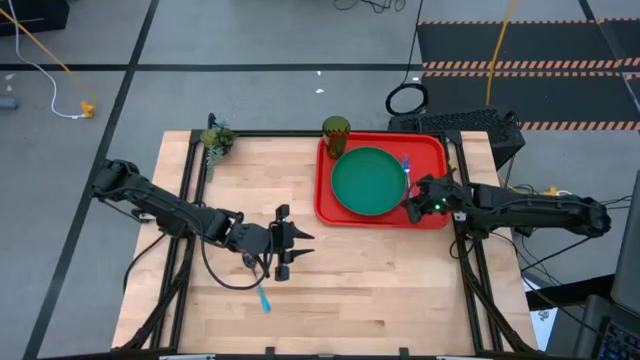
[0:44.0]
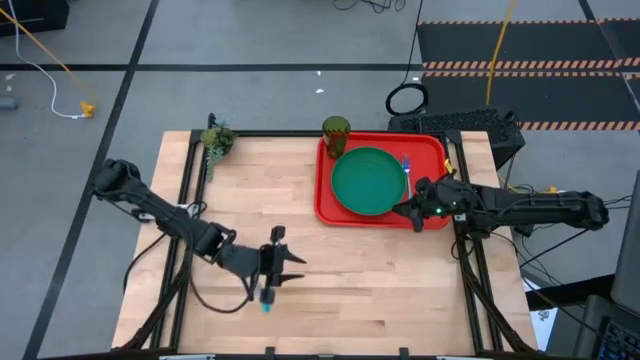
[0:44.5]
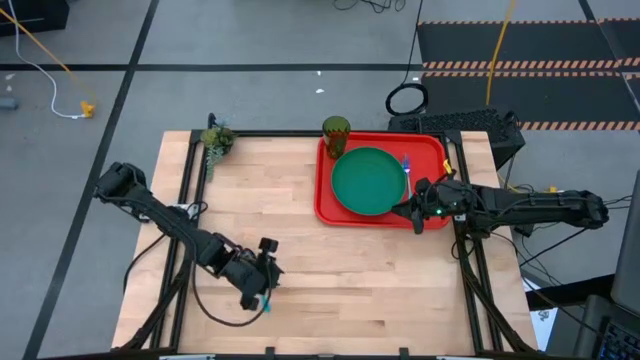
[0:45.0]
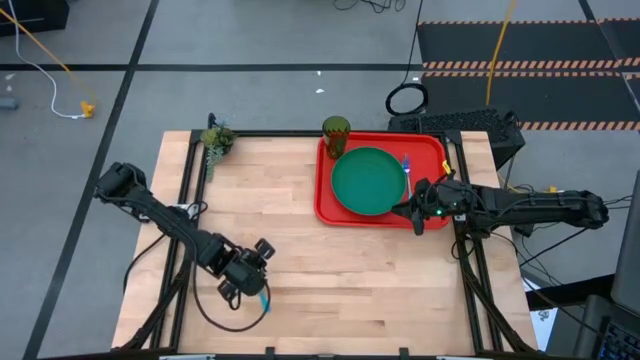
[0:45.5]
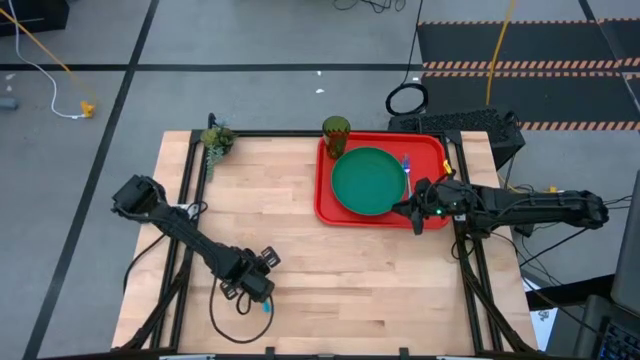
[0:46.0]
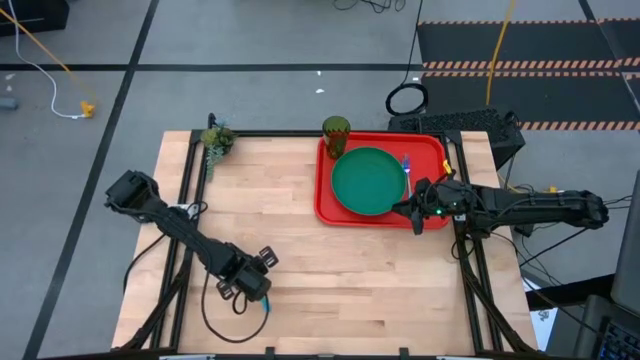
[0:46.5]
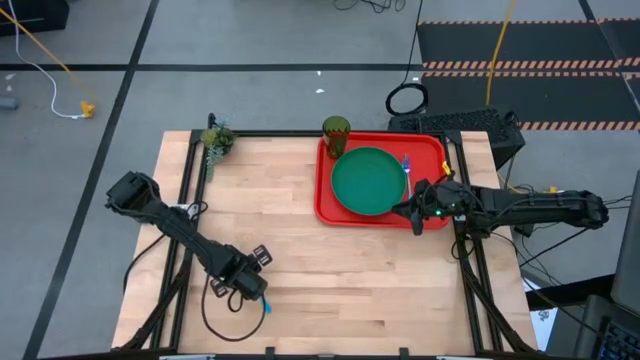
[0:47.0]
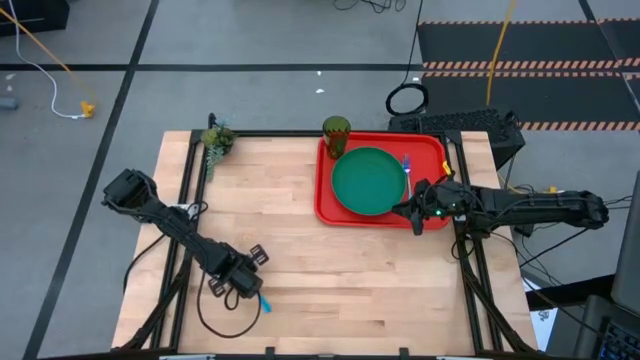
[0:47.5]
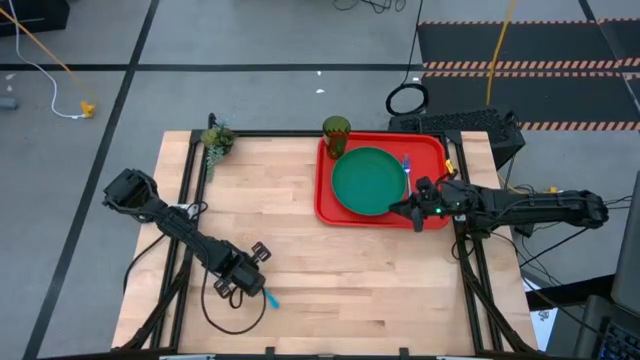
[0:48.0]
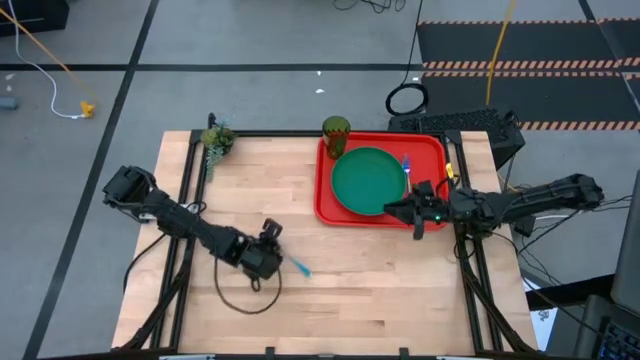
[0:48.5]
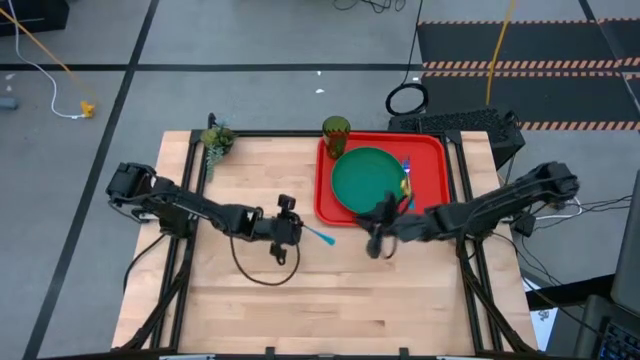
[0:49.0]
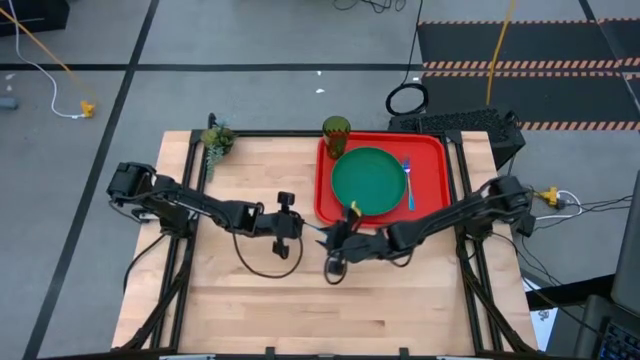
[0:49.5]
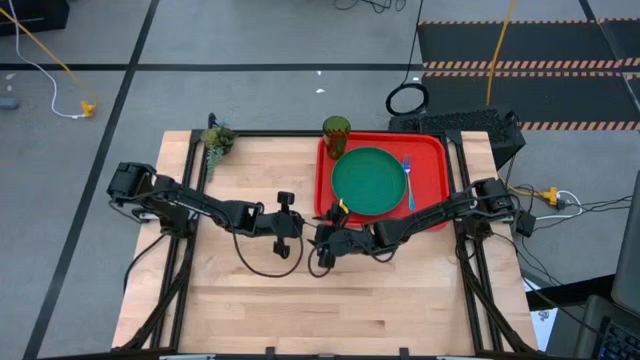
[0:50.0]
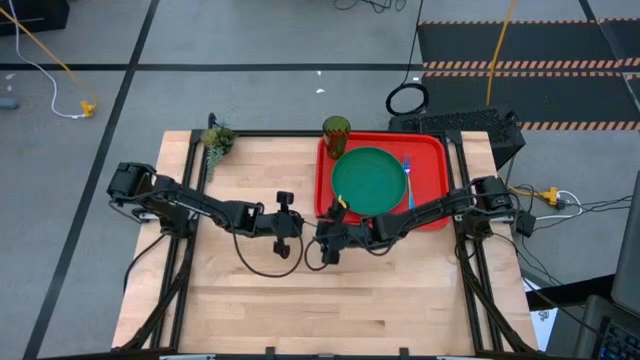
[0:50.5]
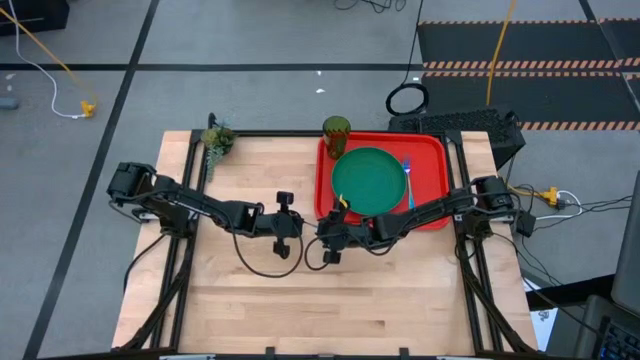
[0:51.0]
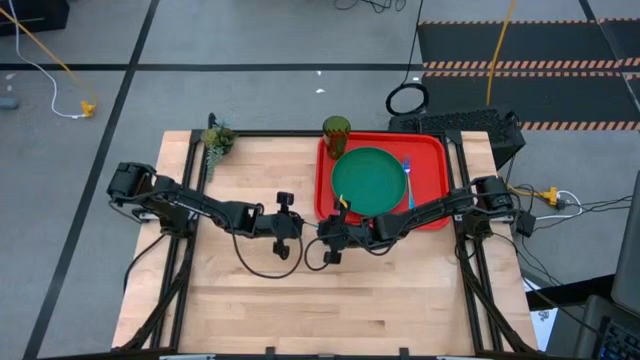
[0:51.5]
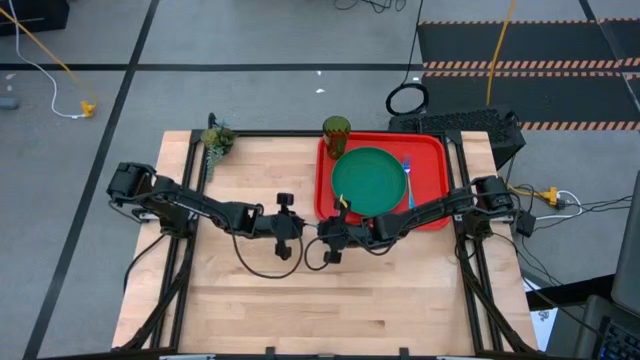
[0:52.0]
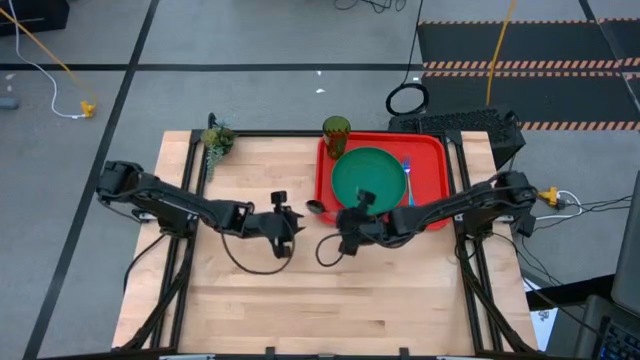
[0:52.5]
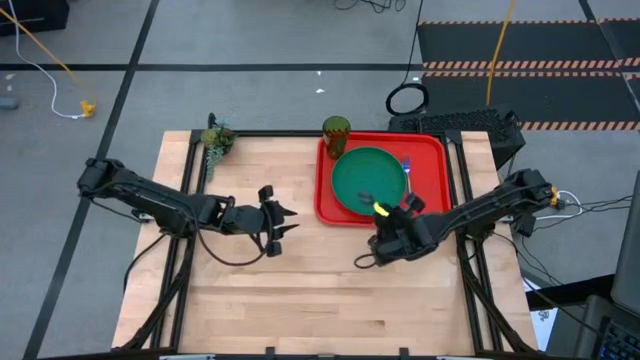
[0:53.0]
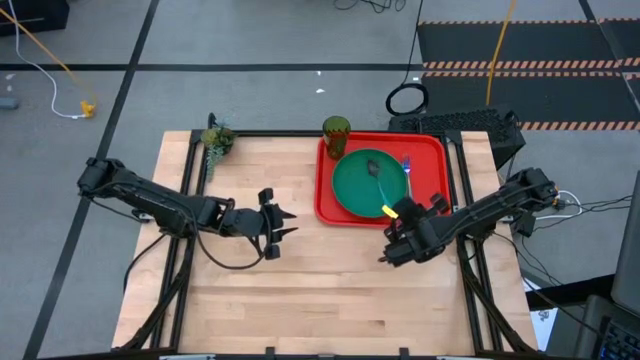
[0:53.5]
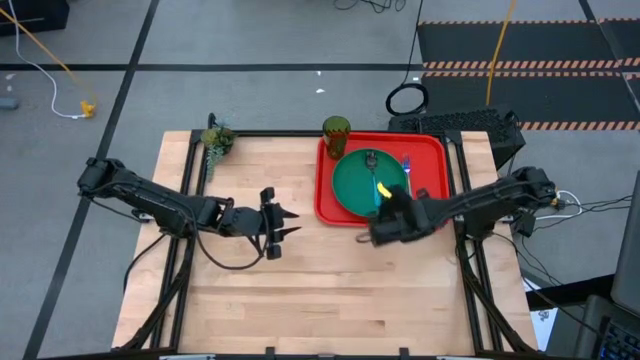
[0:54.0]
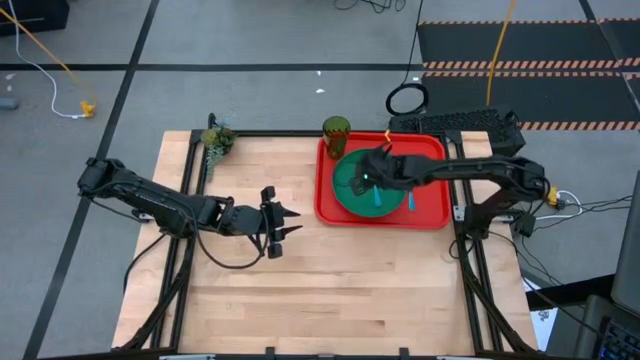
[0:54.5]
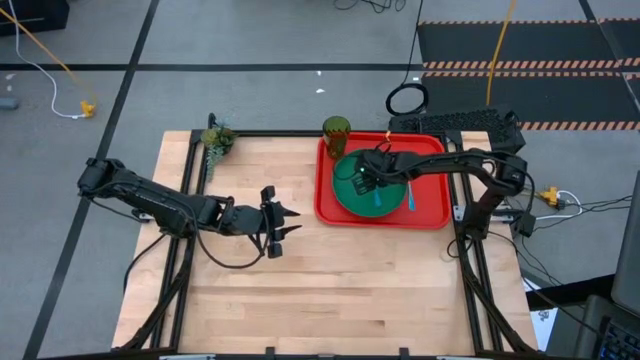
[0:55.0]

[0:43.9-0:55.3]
Task: Pick and place plate/cup/fork/spoon on tray
Put the blue spoon beside the fork on the red tray

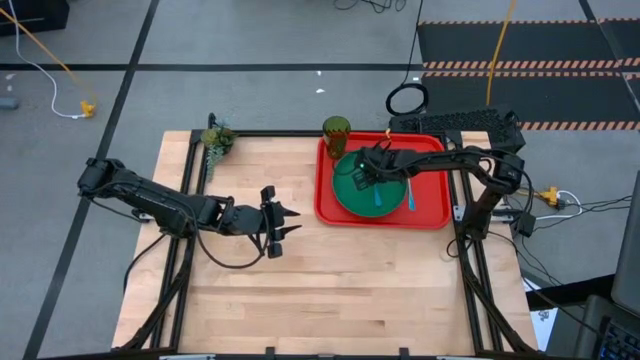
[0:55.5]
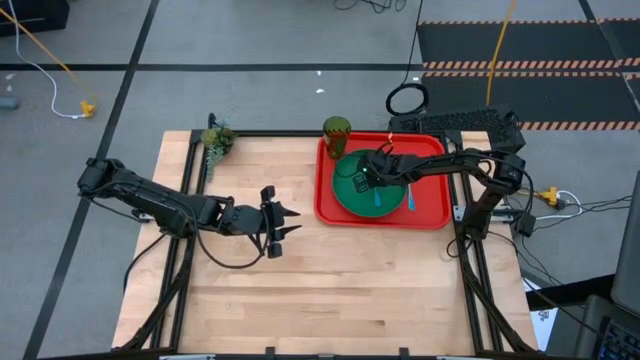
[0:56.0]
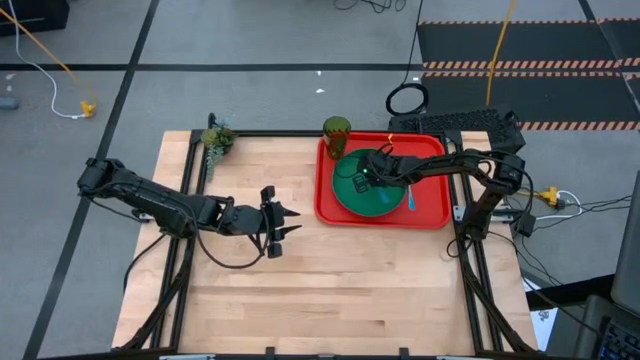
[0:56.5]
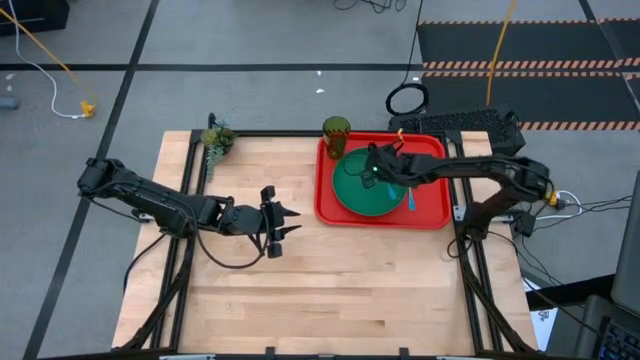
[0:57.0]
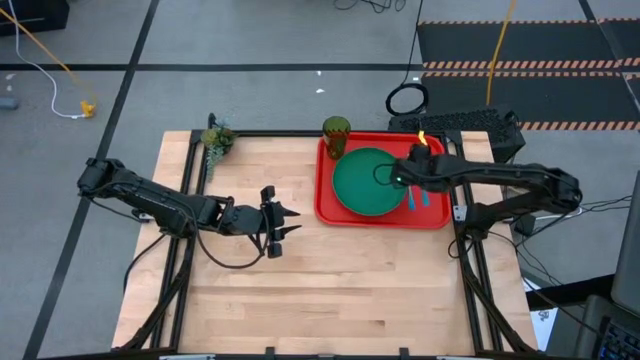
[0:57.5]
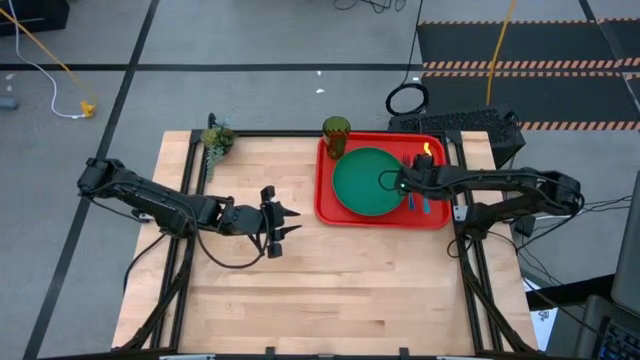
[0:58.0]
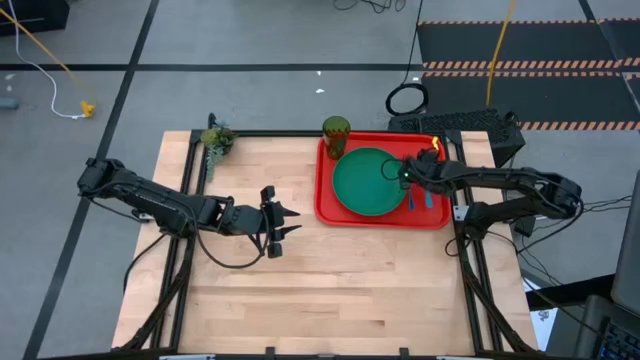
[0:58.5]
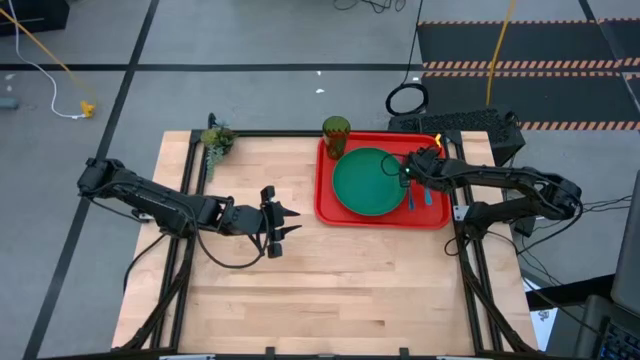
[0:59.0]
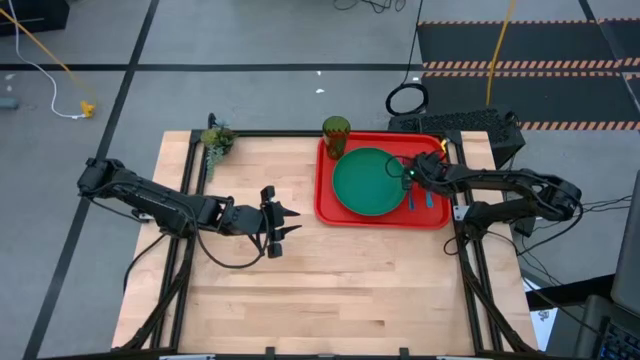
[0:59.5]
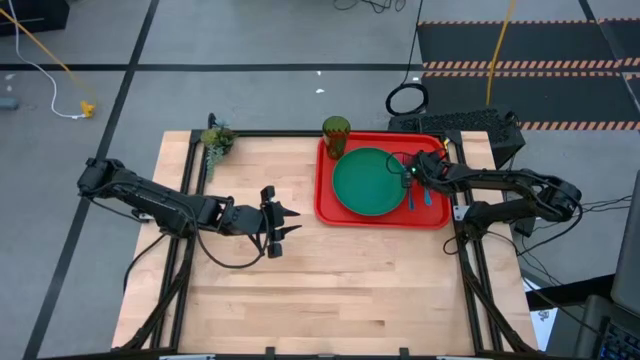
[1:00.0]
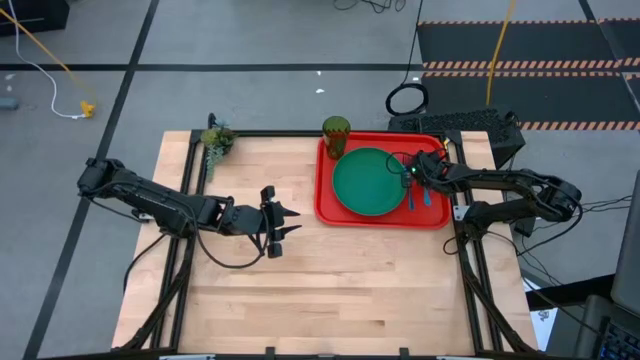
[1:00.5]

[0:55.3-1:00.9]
Put the blue spoon on the red table tray

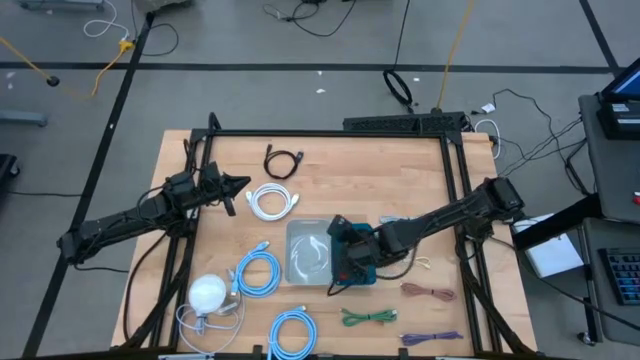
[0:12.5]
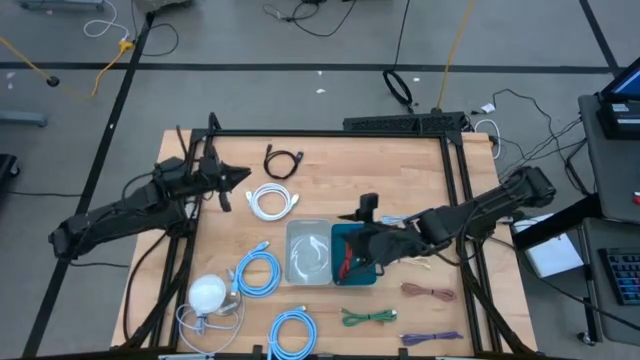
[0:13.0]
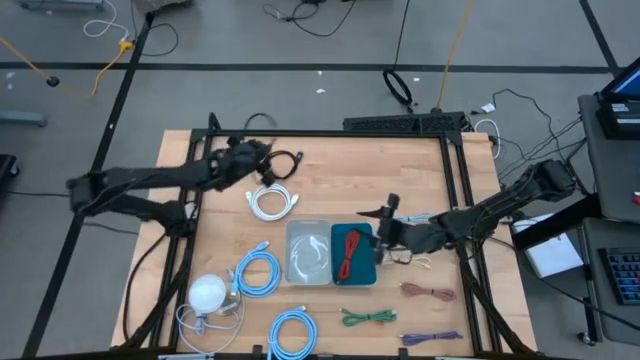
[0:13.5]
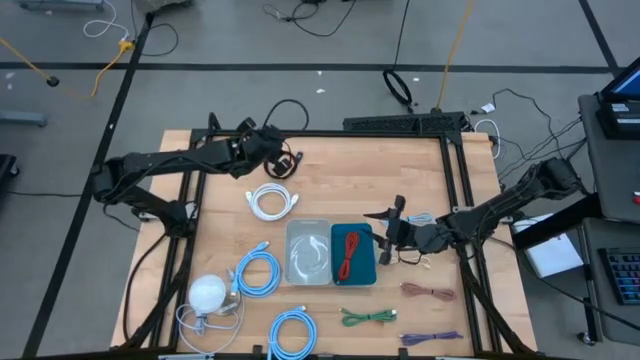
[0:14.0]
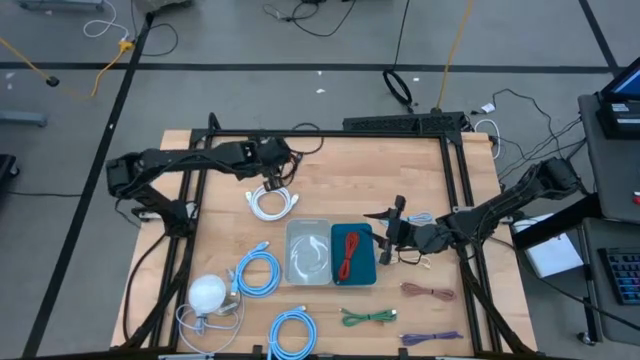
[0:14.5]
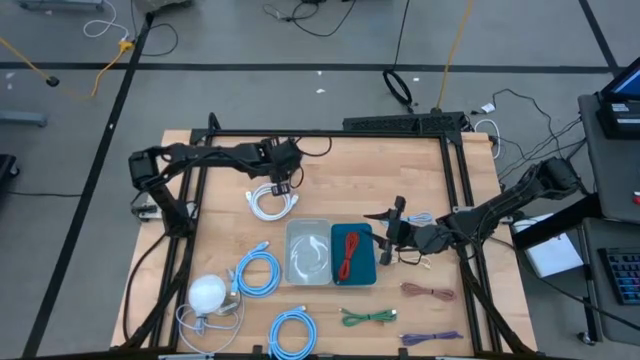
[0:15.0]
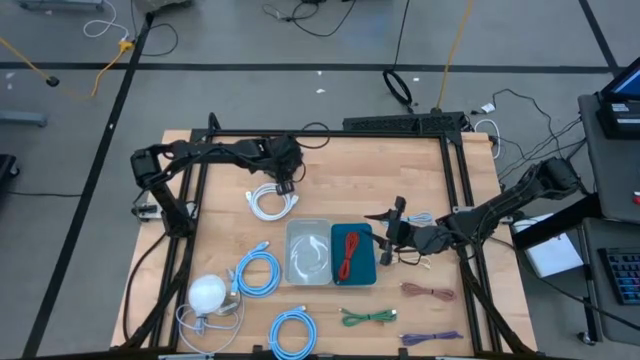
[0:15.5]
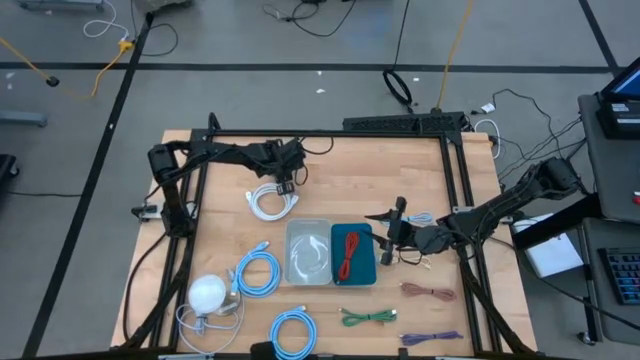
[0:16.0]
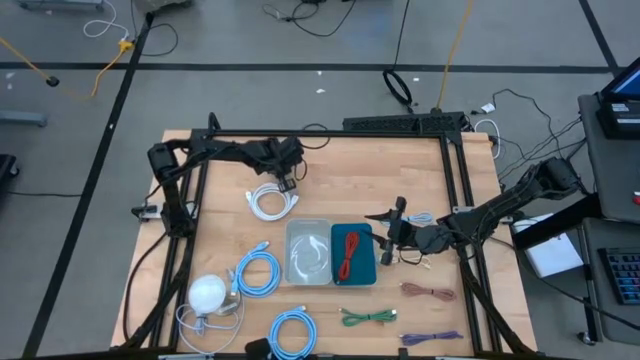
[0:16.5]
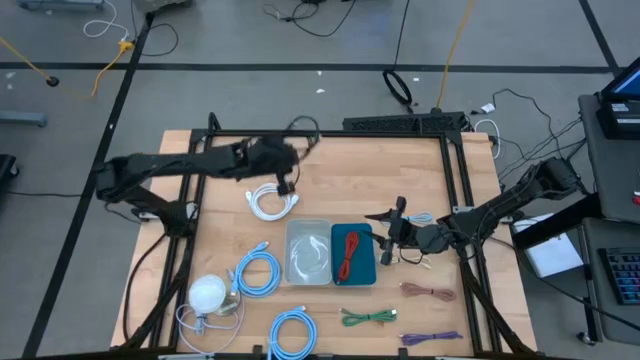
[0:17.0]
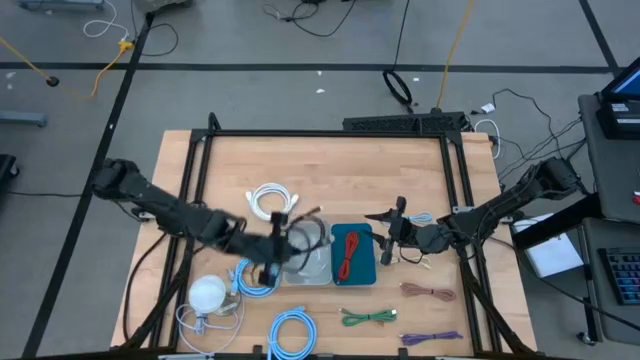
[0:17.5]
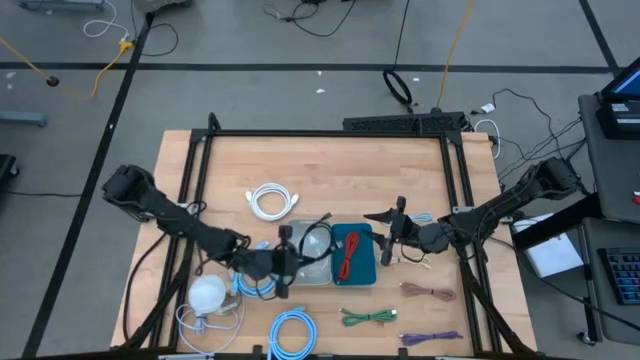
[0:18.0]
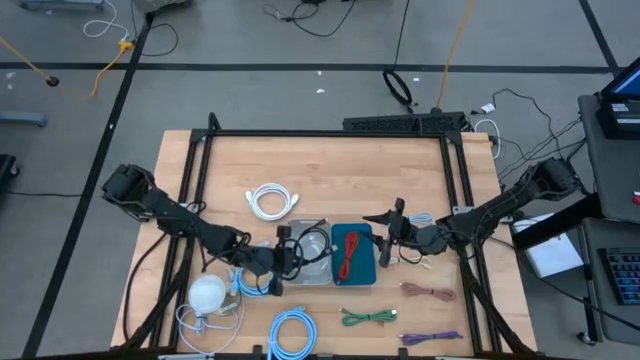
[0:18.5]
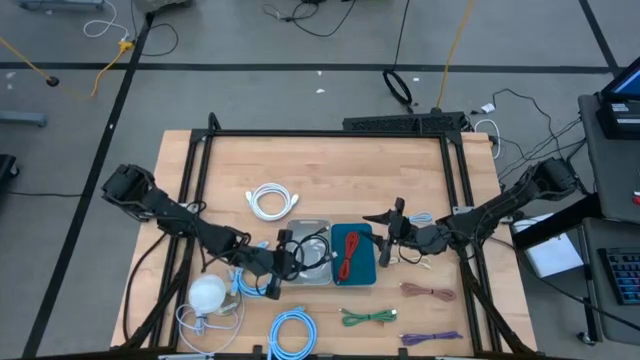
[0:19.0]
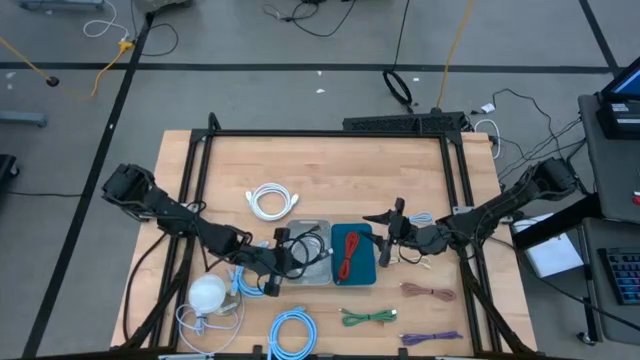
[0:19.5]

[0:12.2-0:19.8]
Task: Pick & Place USB Port
Put the black display cable into the gray bin
